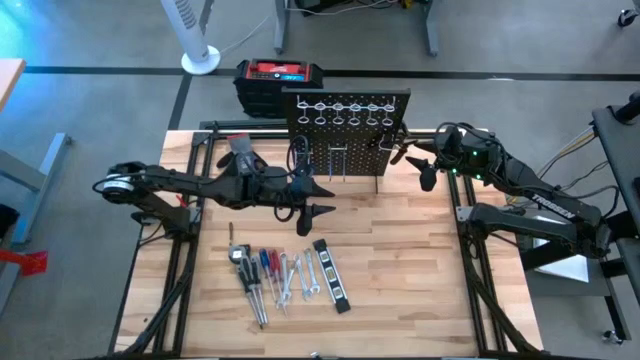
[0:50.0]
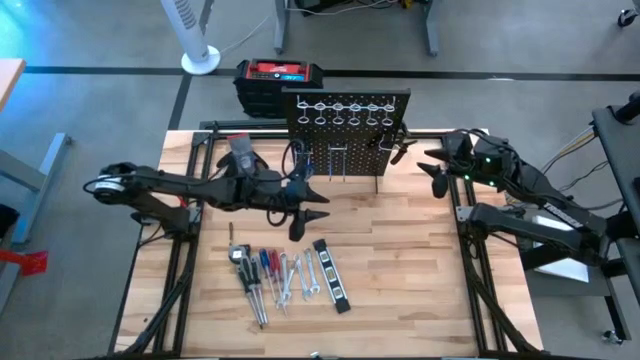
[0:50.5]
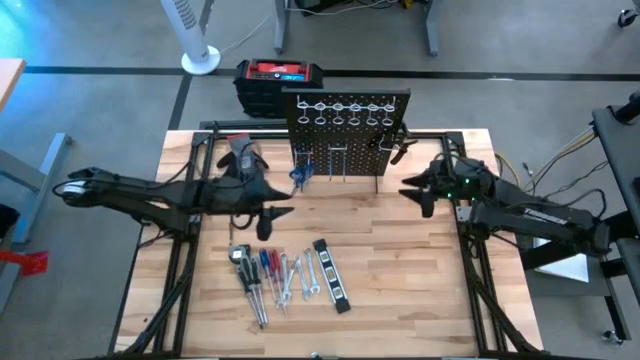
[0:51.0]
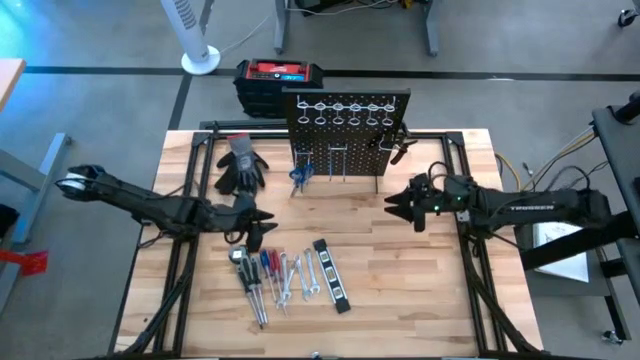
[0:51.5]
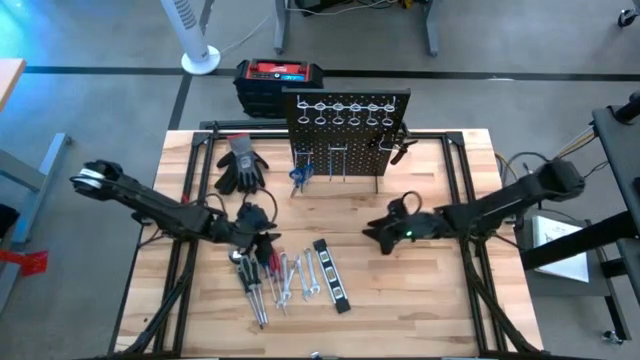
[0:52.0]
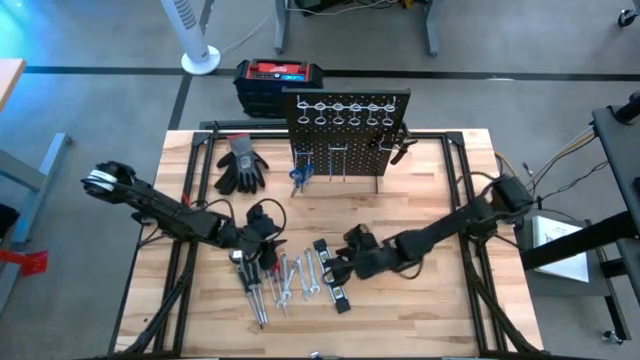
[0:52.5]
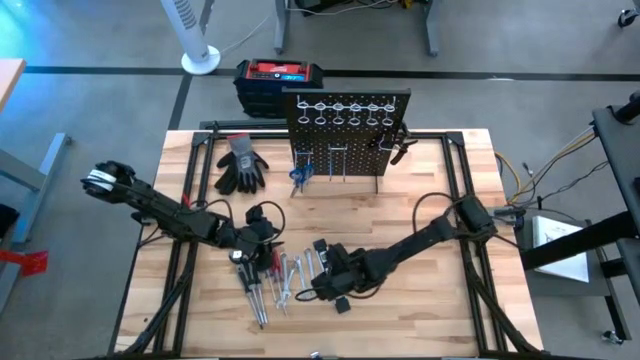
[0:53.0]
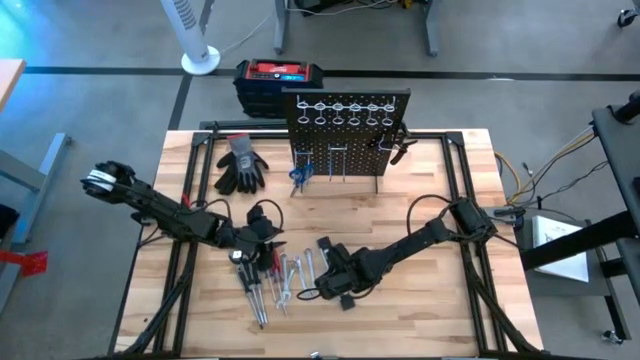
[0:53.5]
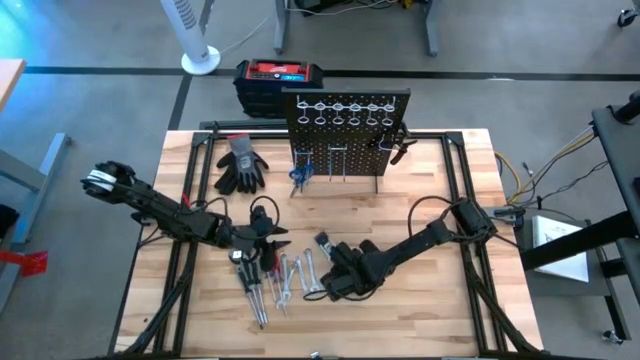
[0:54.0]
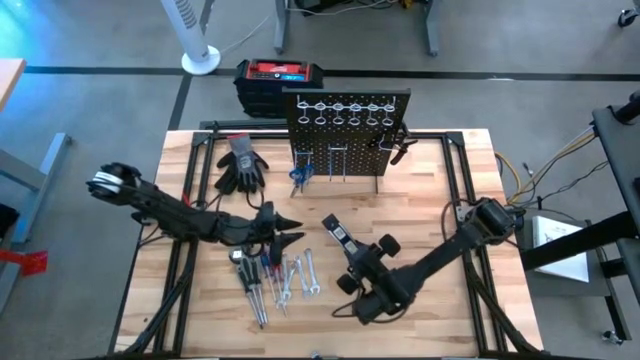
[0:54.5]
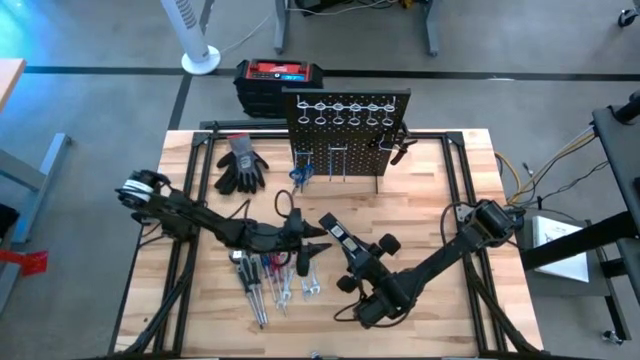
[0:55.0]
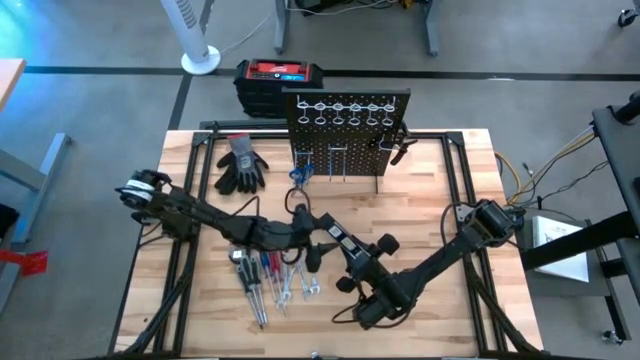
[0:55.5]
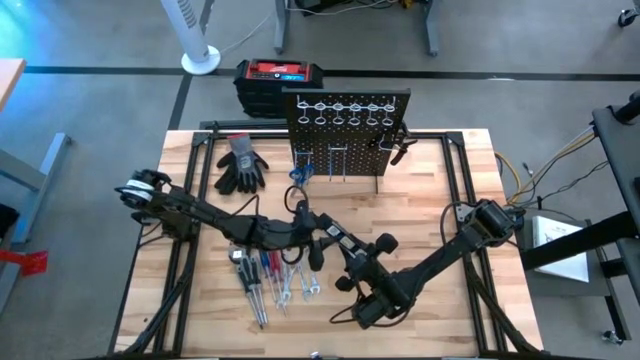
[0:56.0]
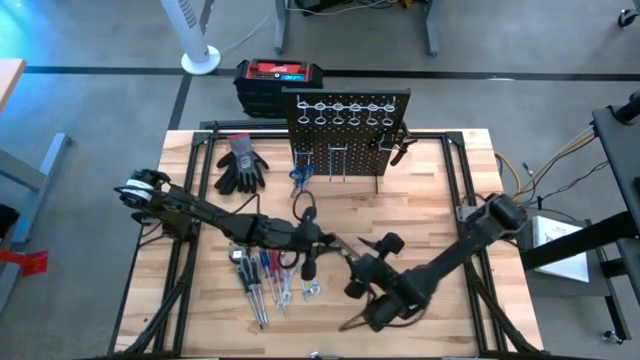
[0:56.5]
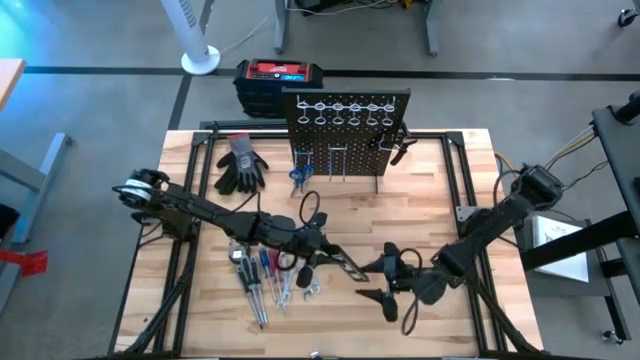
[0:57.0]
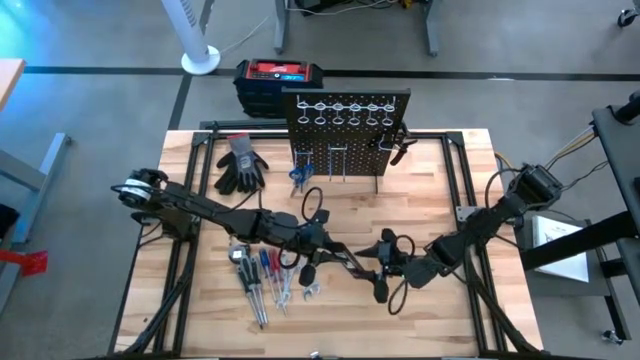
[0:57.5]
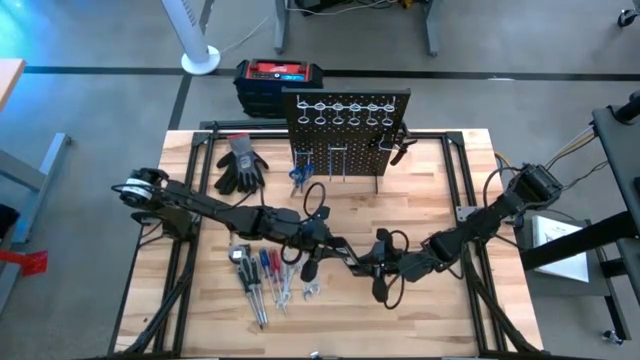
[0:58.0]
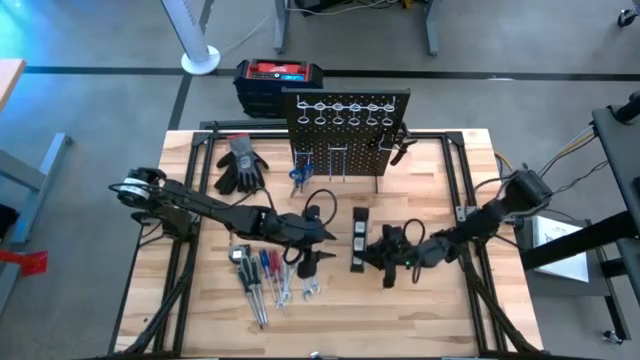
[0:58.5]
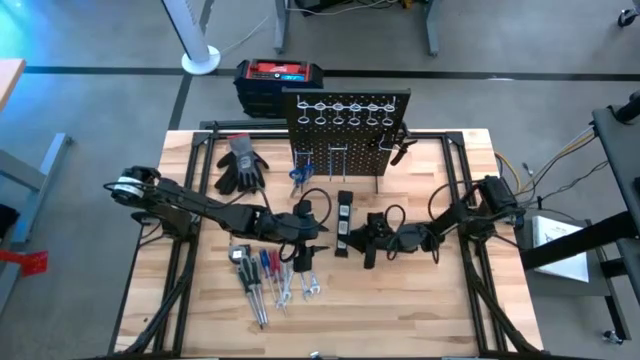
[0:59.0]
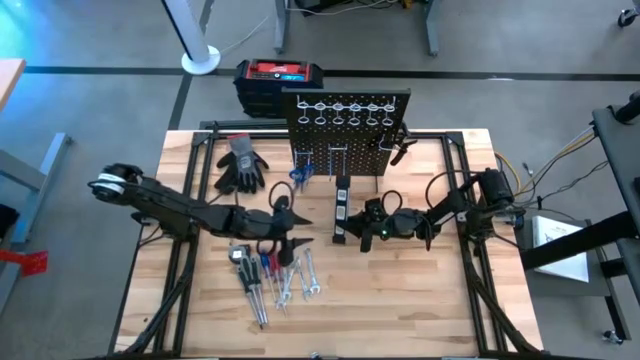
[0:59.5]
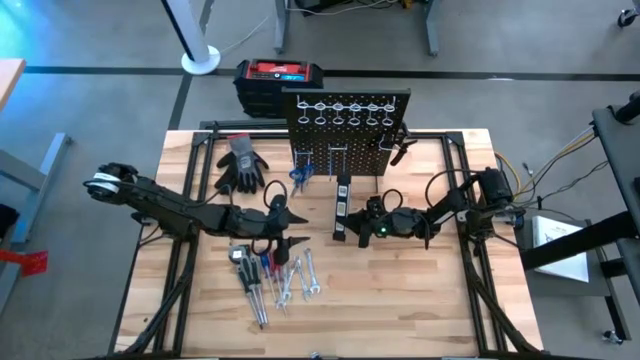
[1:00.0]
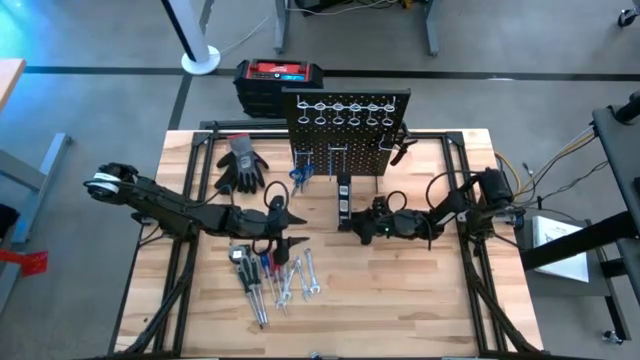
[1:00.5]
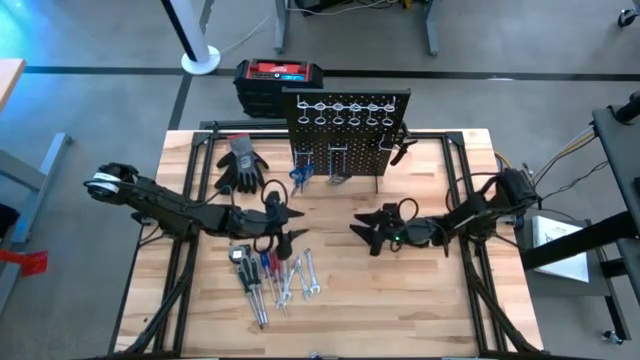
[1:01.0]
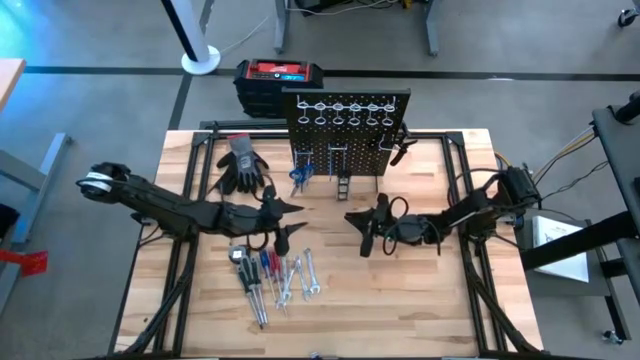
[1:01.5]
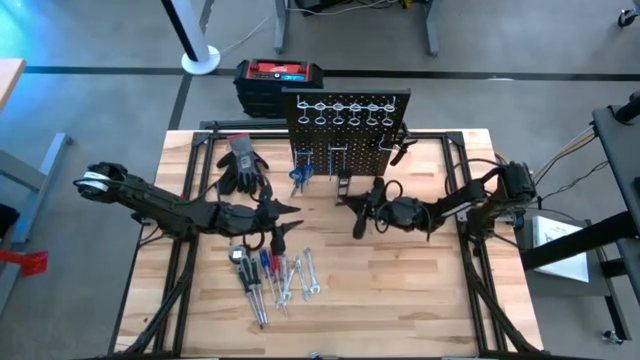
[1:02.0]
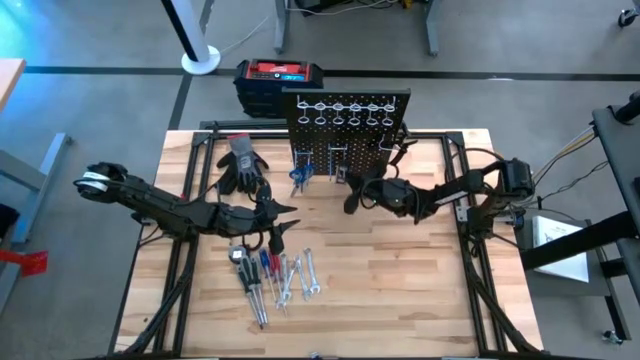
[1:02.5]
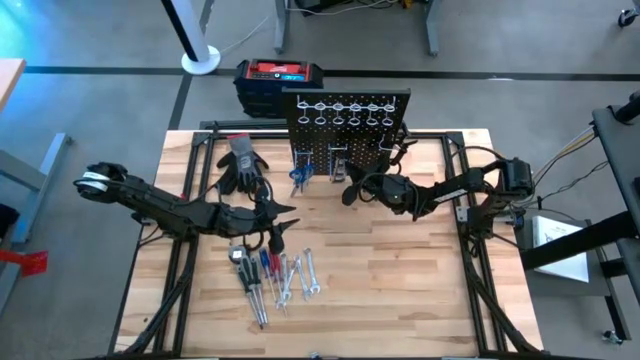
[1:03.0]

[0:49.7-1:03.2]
Task: Hang tools onto peg board
Hang the black spirit level on the peg board

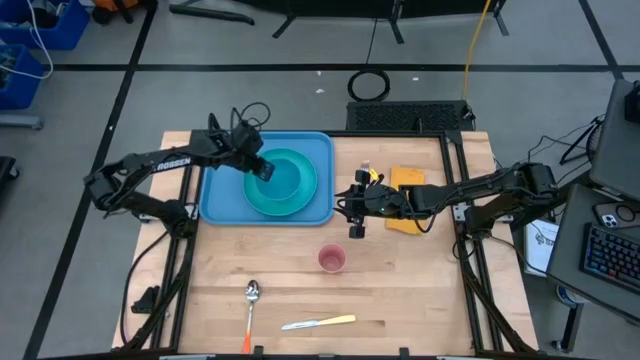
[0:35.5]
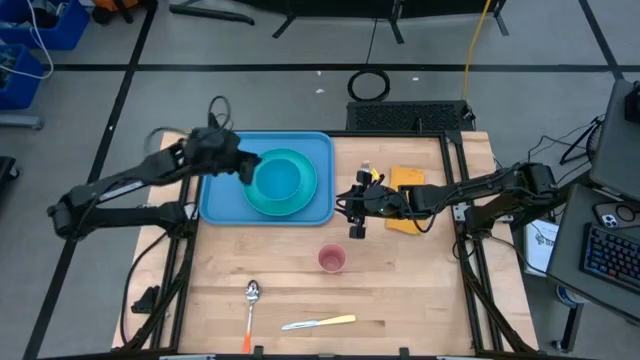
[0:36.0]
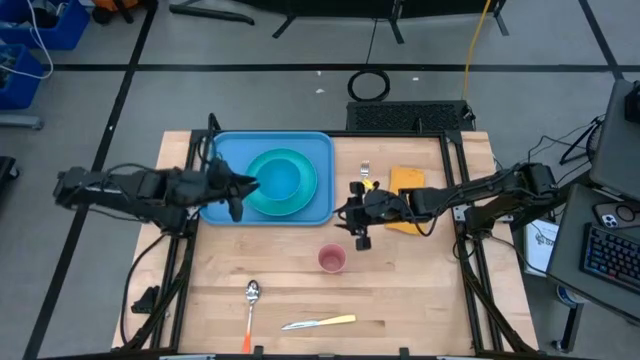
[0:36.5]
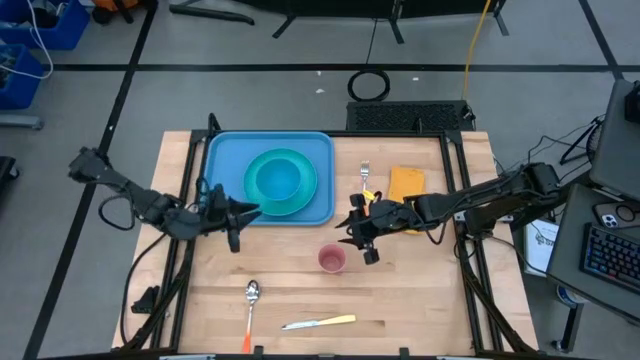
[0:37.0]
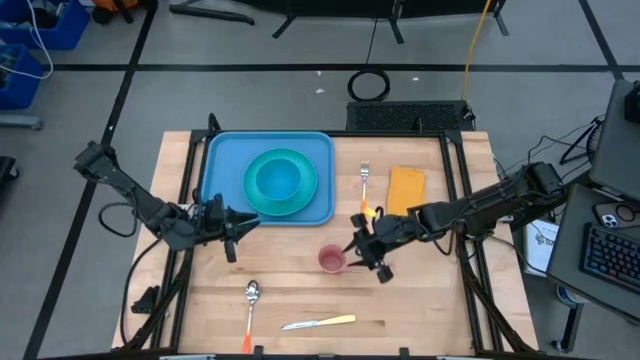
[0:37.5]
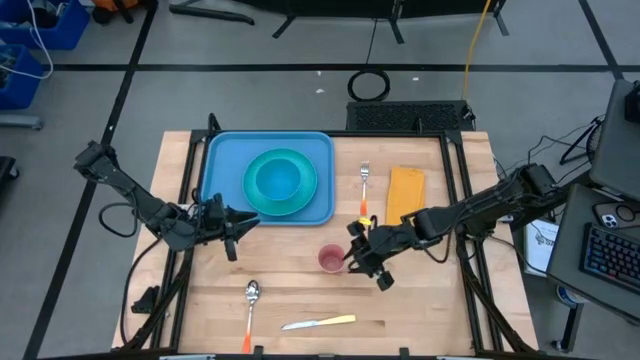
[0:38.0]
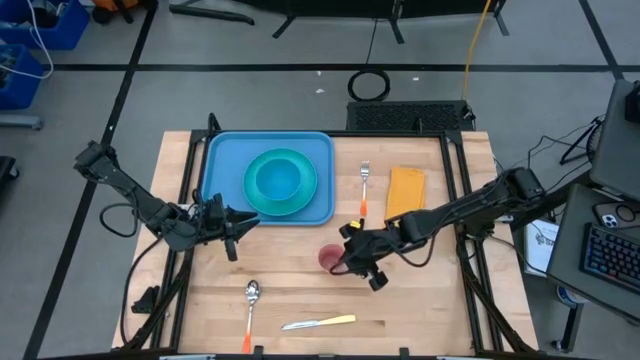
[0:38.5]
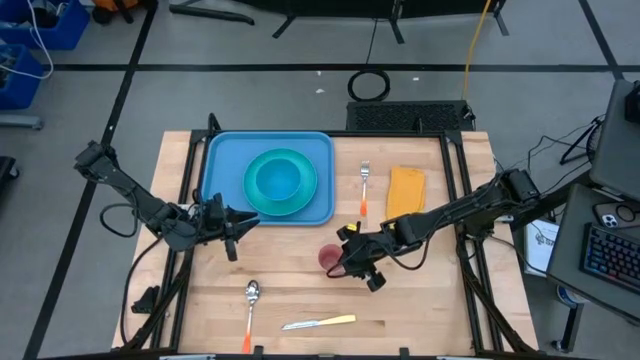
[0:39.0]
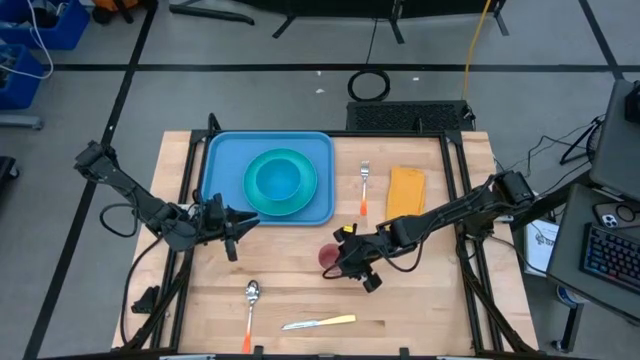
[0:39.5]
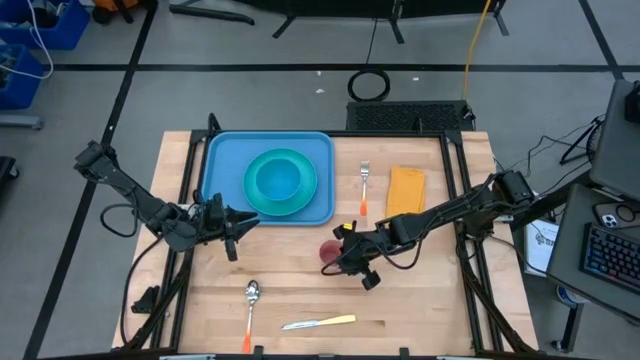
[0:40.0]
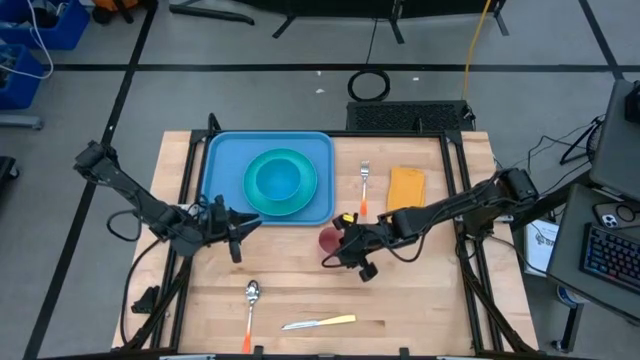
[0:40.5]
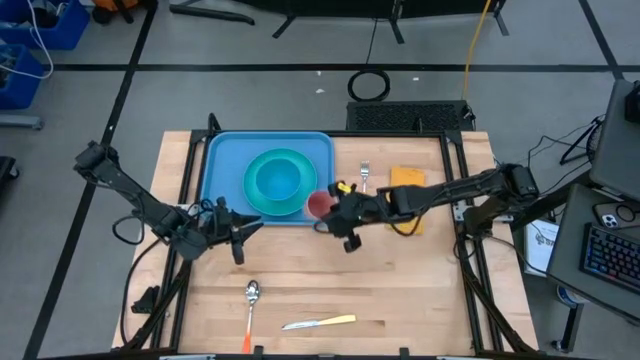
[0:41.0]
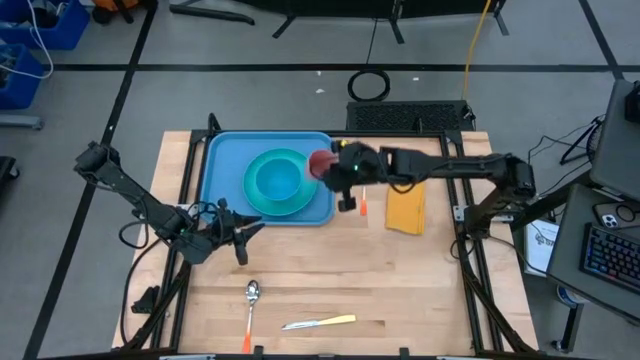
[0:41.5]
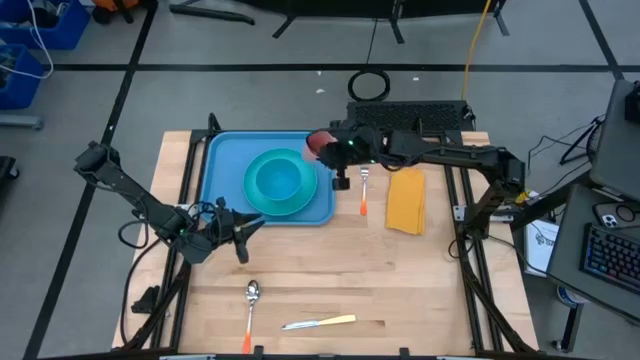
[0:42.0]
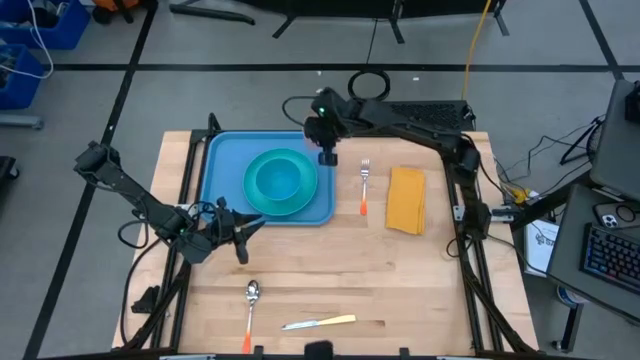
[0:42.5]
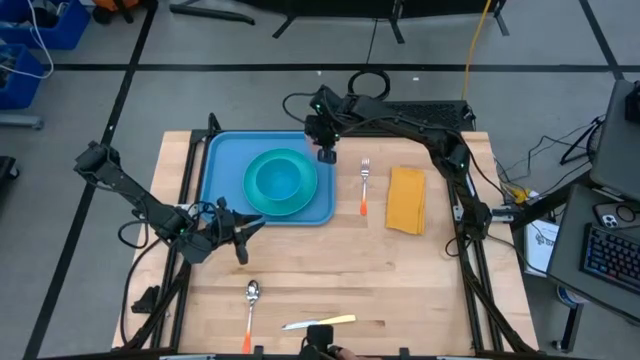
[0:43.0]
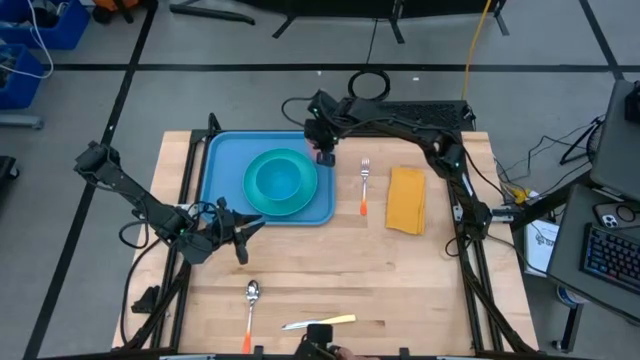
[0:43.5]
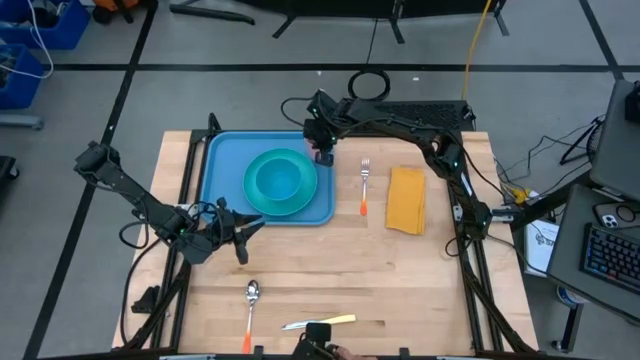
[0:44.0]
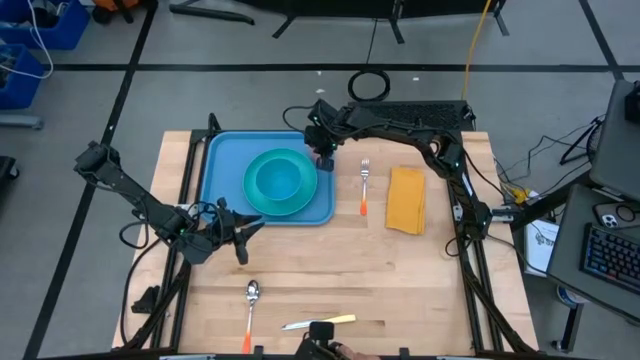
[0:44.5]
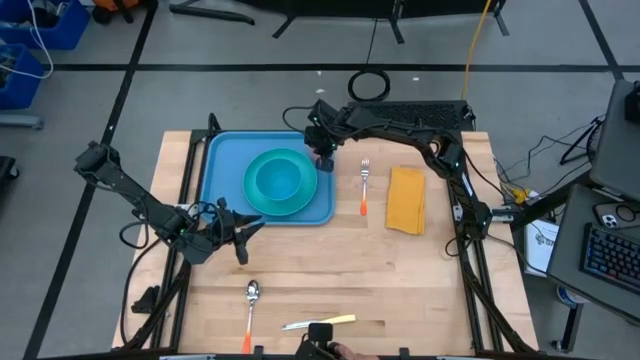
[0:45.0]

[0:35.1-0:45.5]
Task: Set up tray
Put the pink cup on top of the green plate on the blue serving tray
